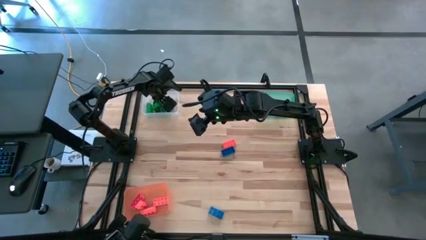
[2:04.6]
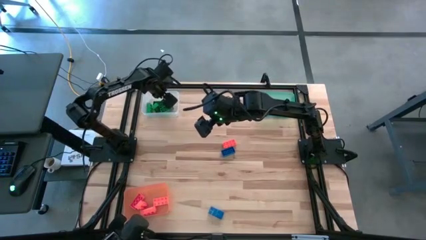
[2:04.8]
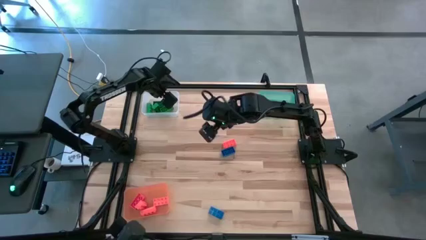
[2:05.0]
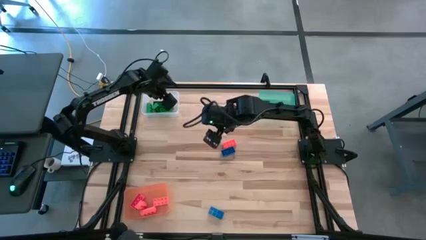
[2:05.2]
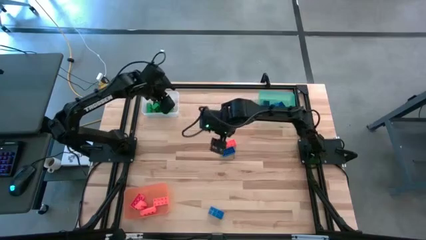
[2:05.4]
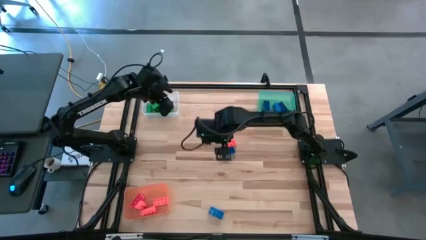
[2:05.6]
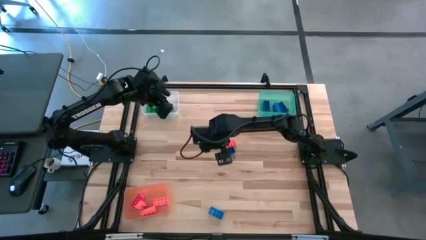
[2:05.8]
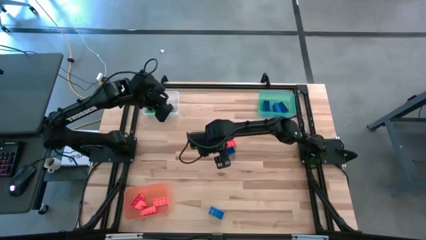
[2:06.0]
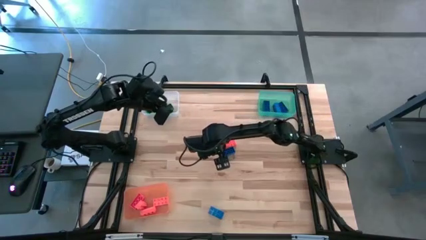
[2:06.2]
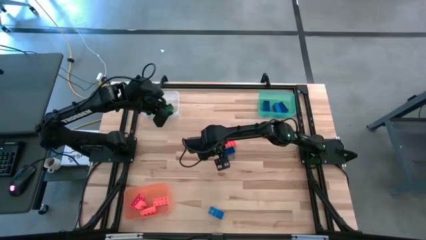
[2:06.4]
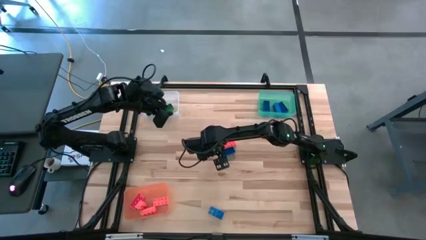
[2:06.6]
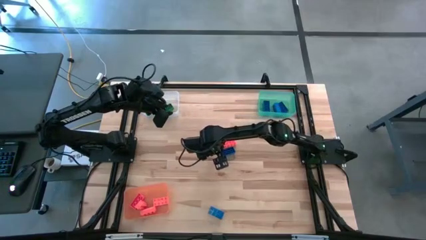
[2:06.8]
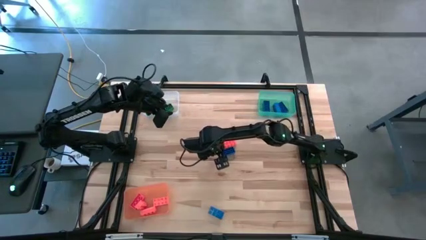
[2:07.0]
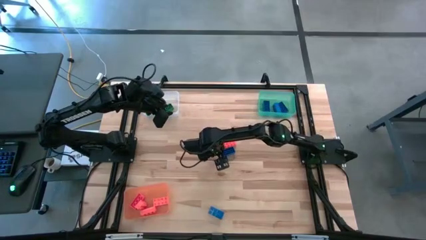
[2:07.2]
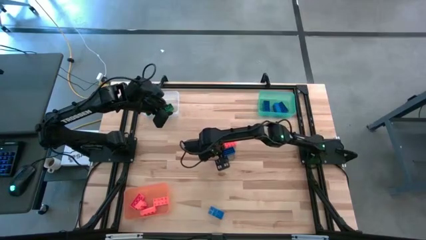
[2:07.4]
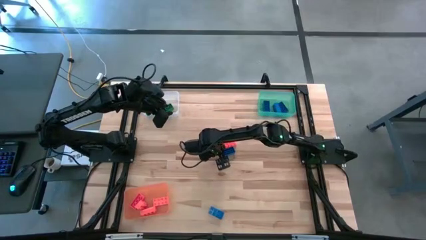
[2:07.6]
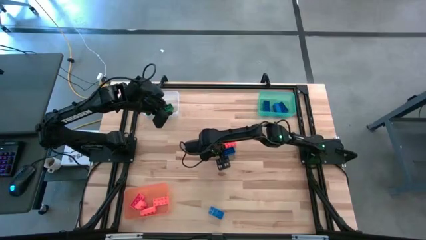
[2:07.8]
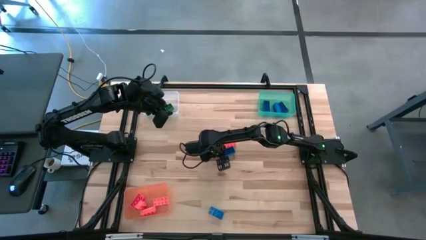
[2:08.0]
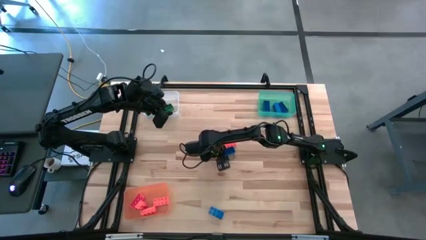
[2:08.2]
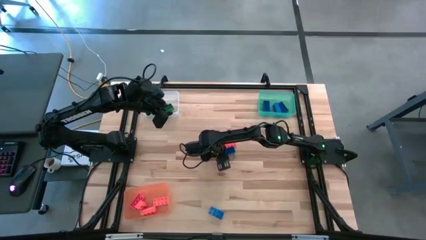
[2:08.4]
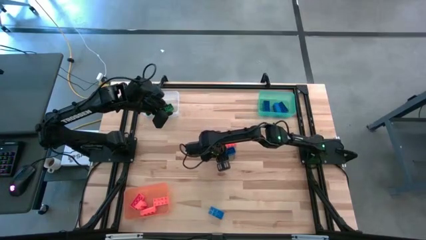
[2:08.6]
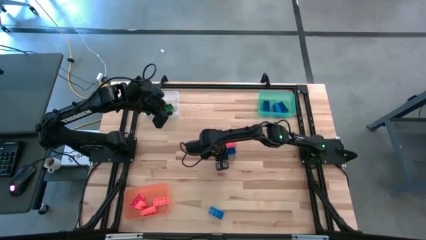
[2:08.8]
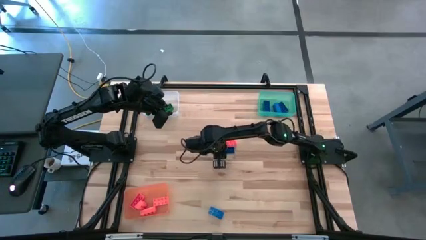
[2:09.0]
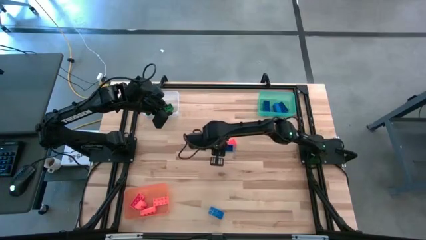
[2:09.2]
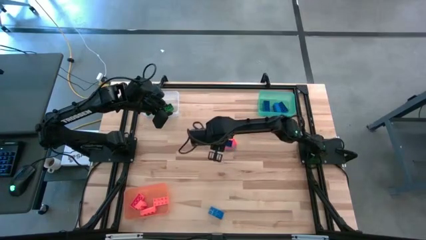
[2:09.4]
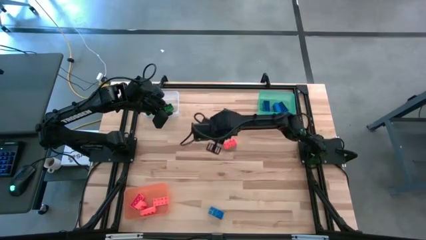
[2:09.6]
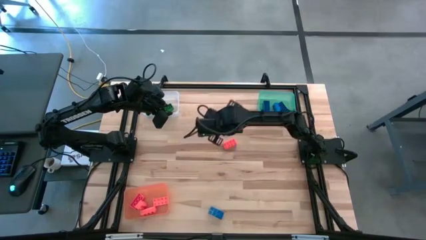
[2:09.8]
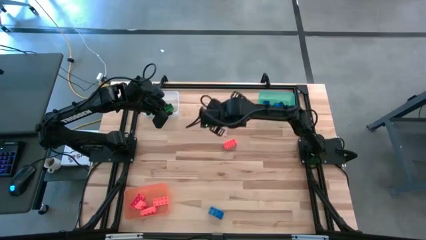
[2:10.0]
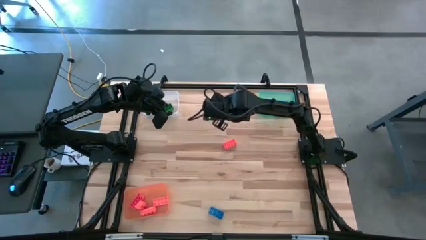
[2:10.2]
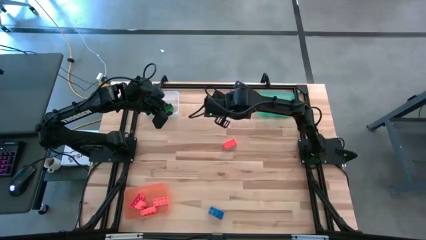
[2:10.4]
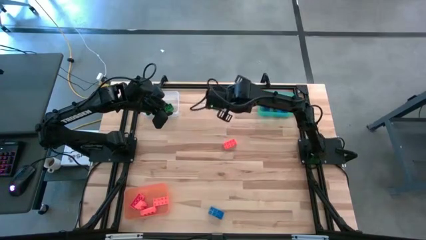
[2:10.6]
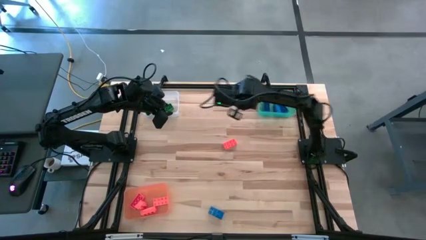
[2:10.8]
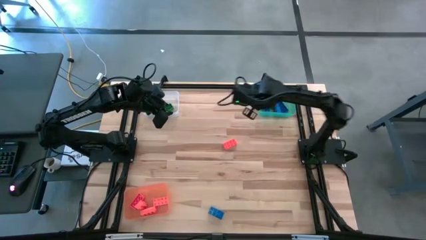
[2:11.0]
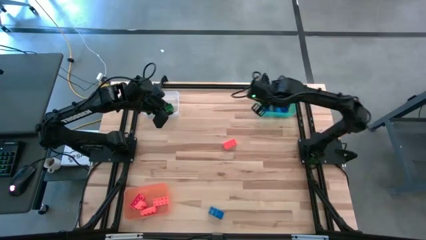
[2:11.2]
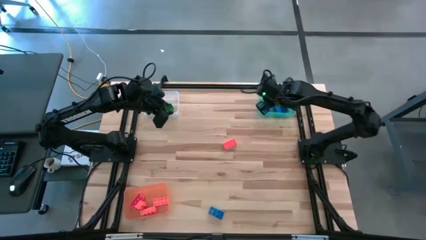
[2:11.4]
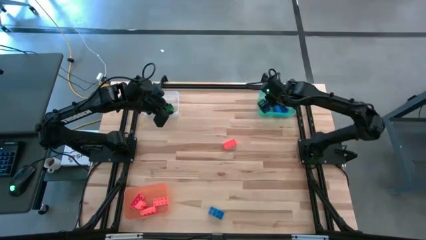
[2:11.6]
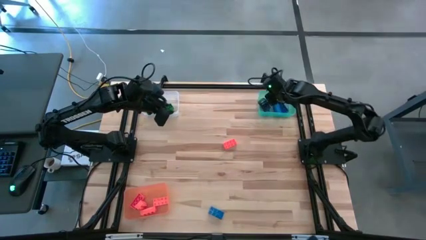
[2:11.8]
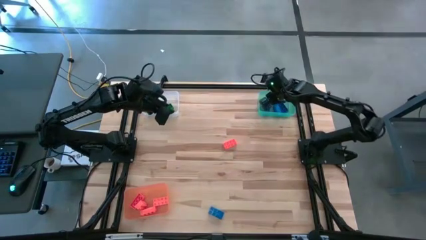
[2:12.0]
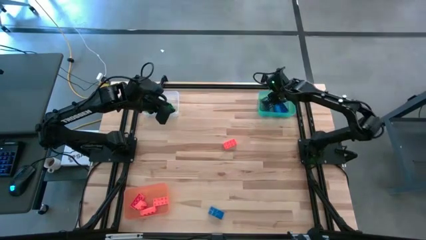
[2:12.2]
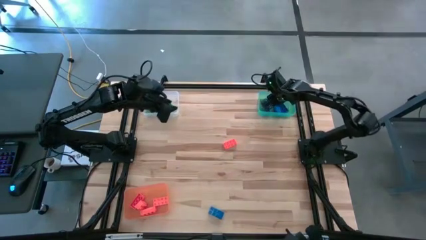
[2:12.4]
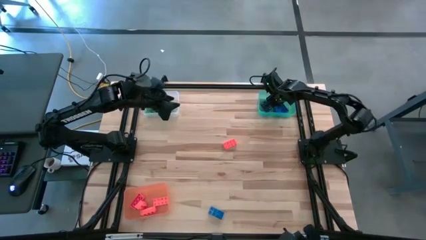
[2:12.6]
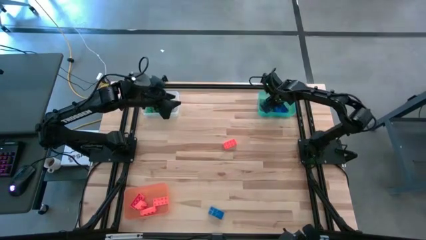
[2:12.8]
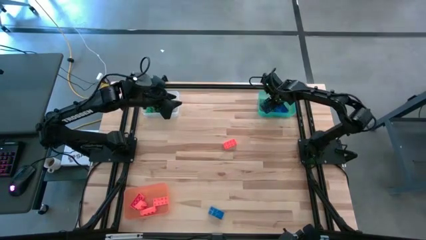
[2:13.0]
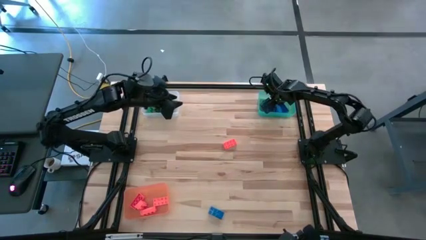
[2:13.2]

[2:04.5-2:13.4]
Task: Sort & place blocks by color
Put the blue game piece into the green bin

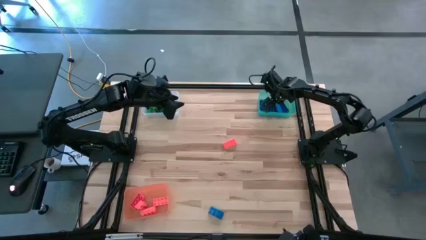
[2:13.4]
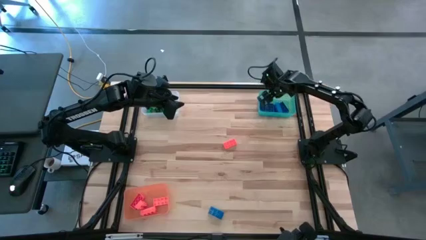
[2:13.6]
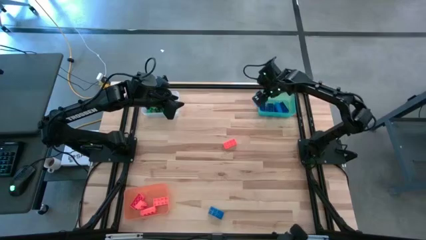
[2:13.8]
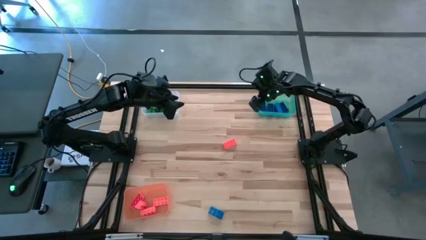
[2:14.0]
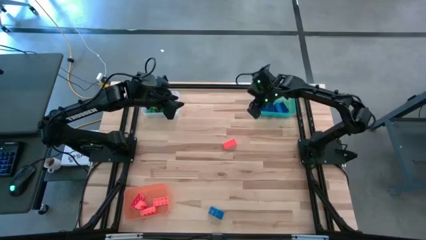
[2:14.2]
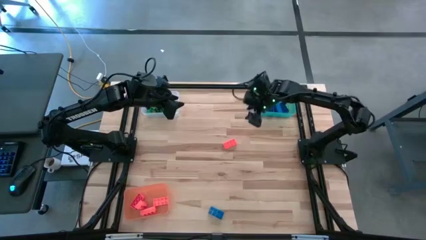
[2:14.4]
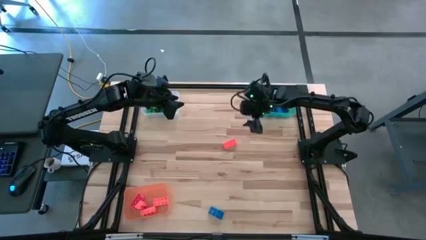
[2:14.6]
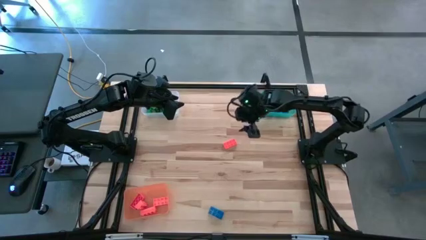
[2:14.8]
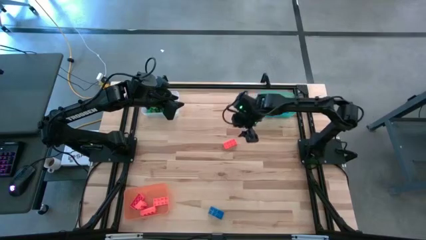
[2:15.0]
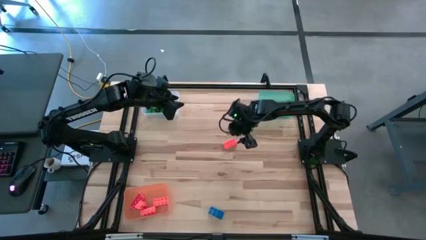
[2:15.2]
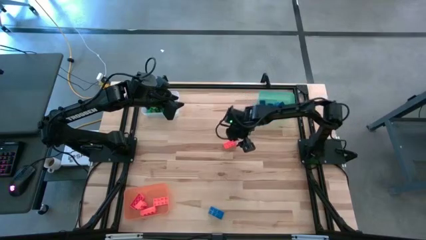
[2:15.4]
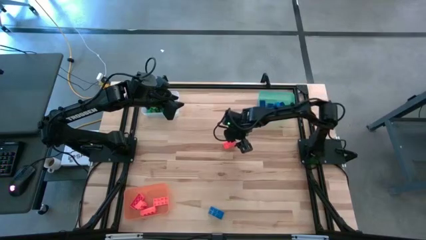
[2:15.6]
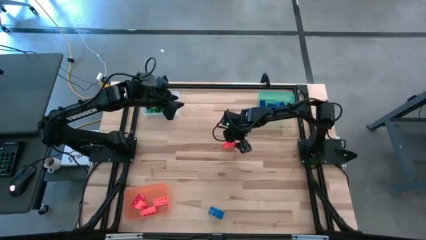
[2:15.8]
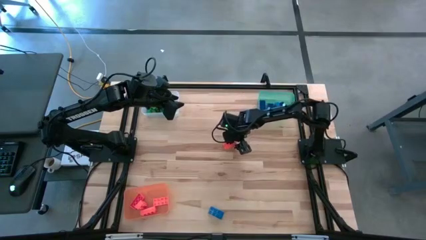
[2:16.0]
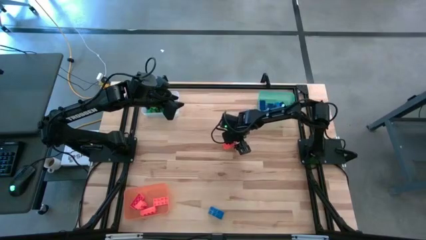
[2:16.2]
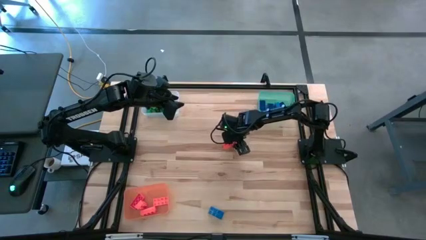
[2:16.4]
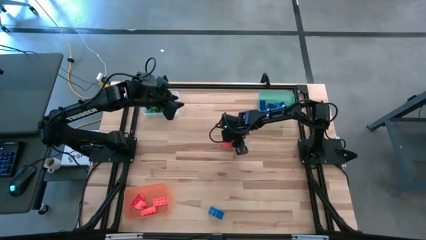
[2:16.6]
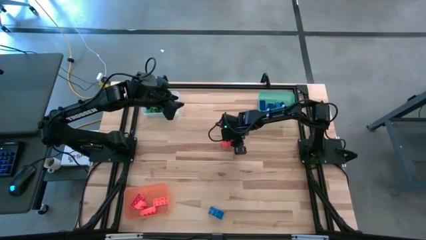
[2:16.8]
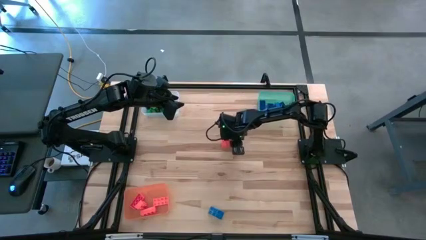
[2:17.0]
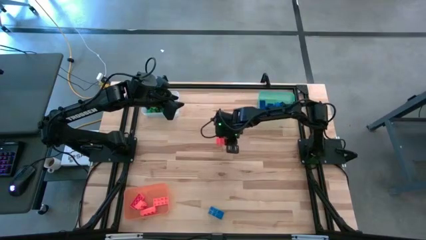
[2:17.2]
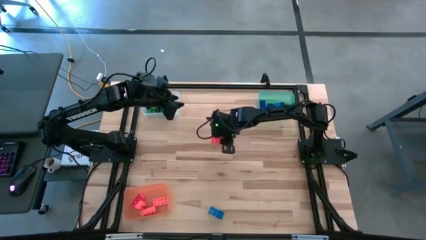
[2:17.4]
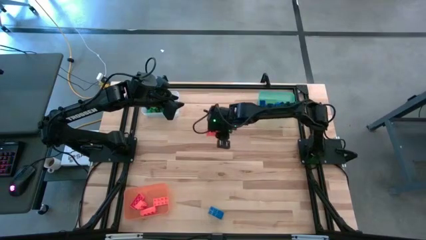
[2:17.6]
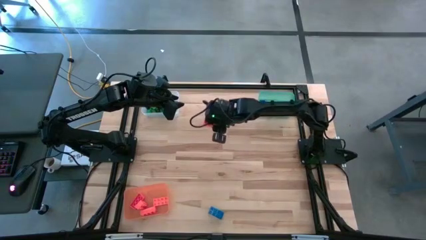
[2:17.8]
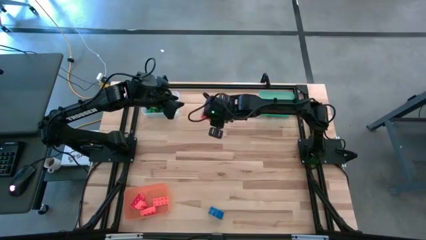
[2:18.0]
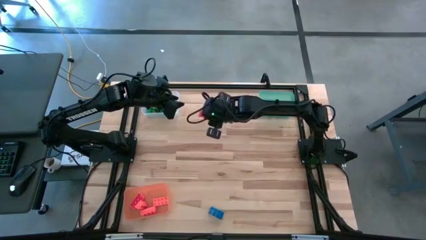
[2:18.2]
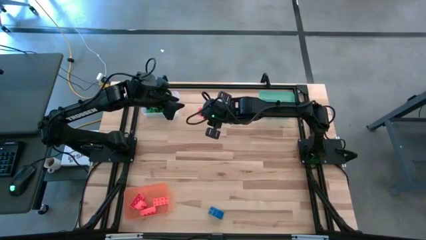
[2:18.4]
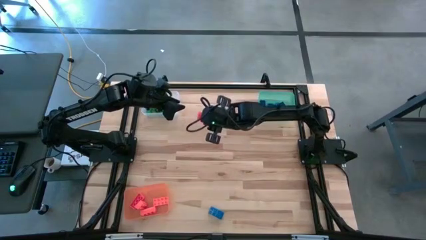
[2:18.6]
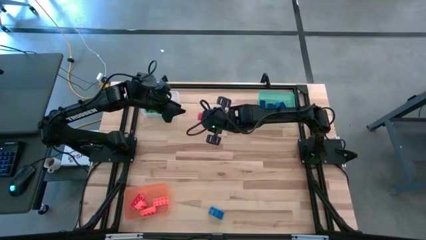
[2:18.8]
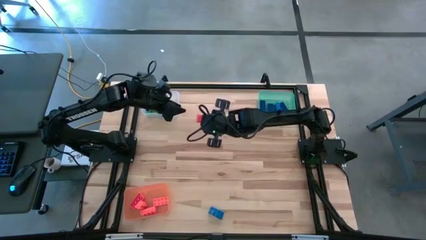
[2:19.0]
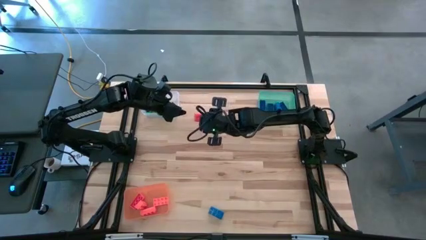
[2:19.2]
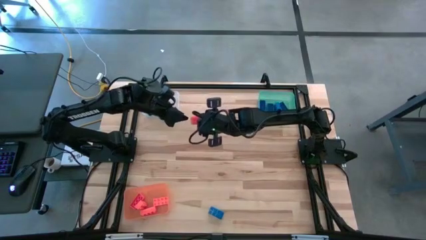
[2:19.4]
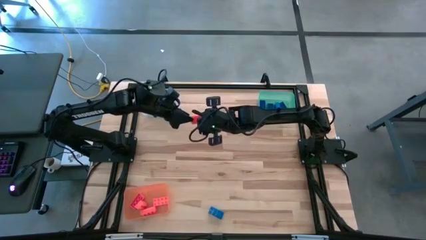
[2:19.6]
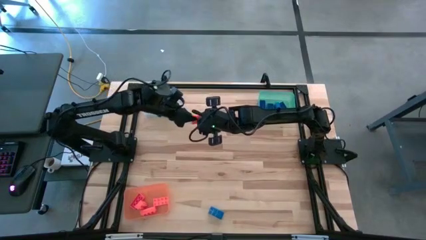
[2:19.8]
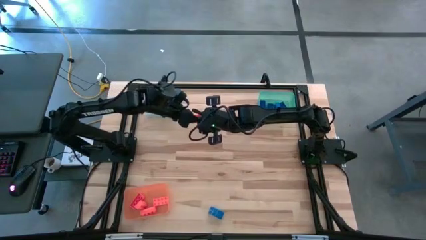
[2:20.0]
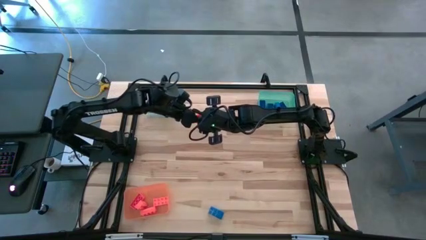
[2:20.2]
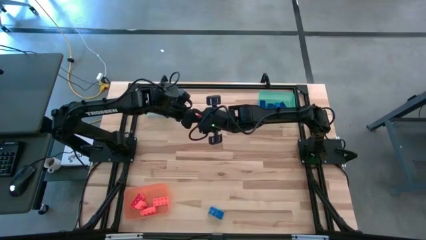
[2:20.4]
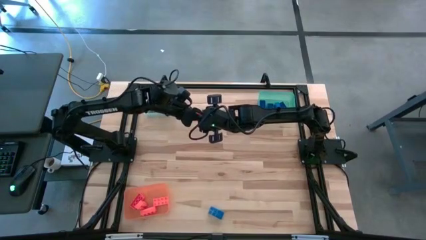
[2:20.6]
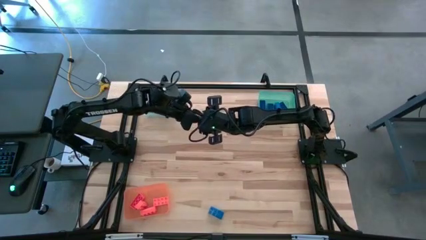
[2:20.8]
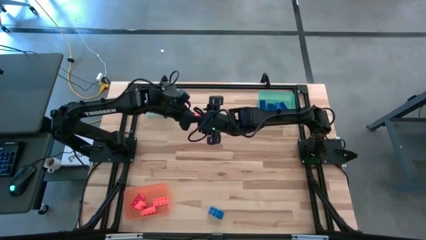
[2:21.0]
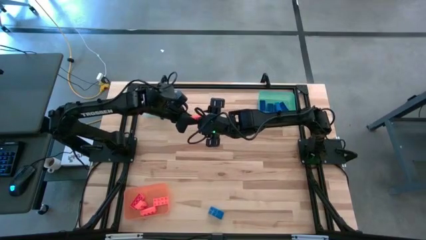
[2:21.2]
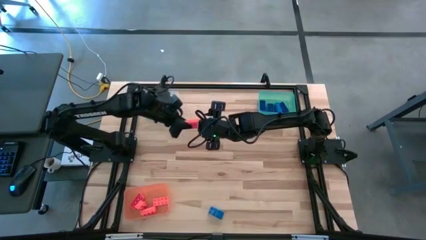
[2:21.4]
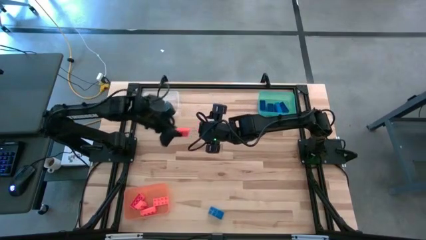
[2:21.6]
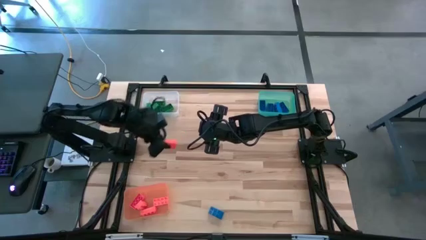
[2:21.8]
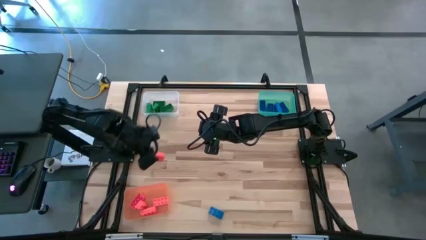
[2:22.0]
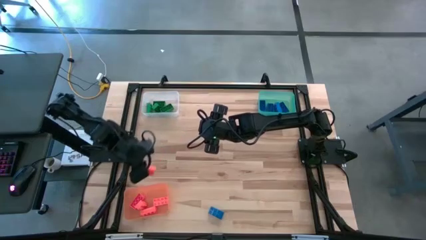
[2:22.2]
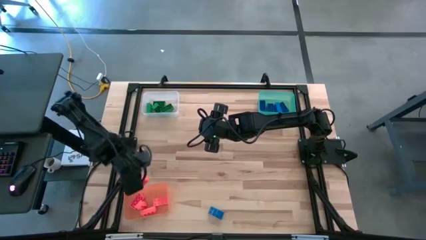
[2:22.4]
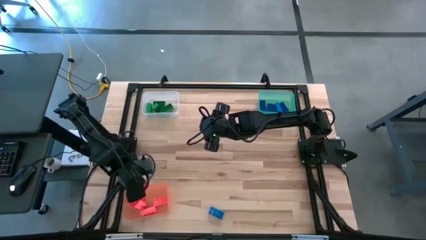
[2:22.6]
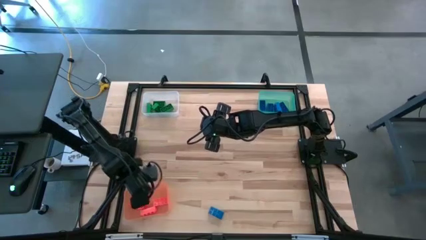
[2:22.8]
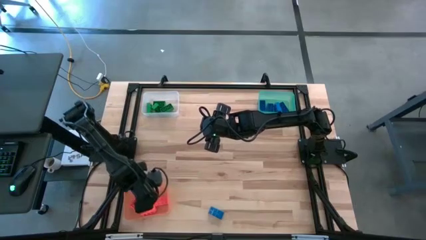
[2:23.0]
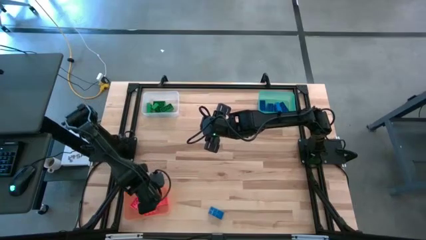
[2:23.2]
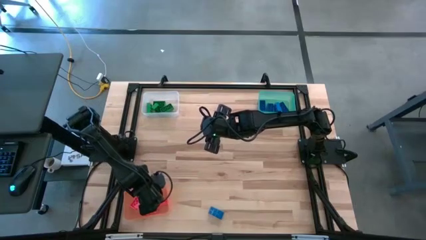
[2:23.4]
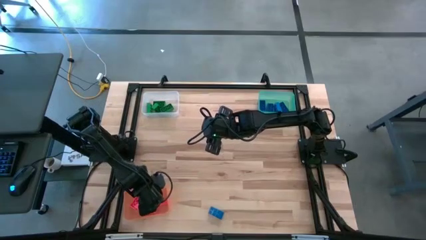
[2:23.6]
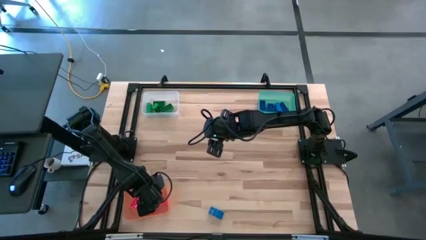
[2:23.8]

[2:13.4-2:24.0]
Put the orange game piece into the orange bin
